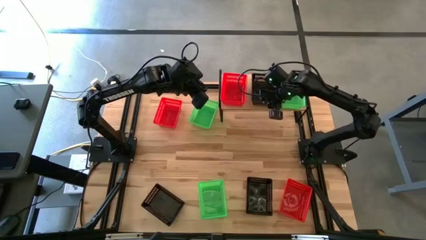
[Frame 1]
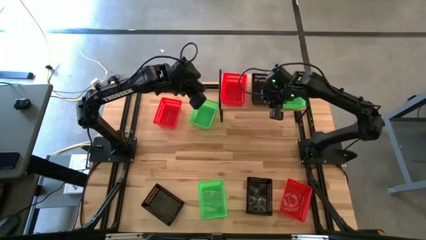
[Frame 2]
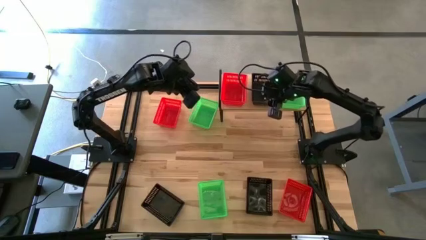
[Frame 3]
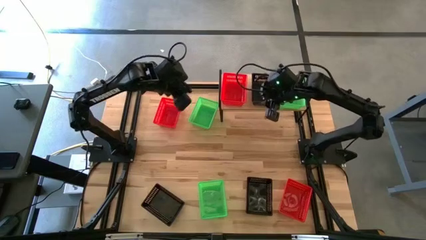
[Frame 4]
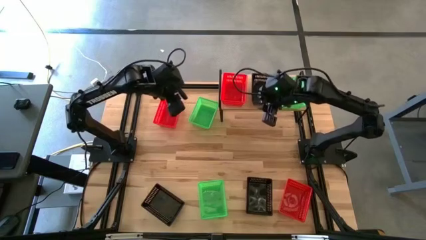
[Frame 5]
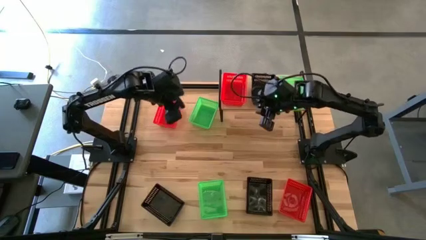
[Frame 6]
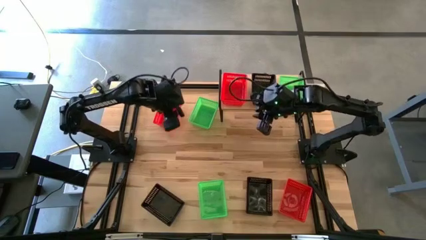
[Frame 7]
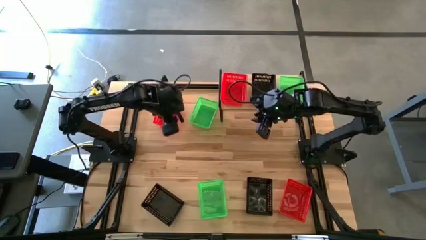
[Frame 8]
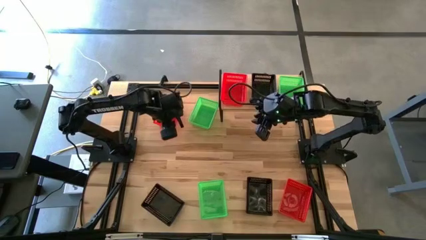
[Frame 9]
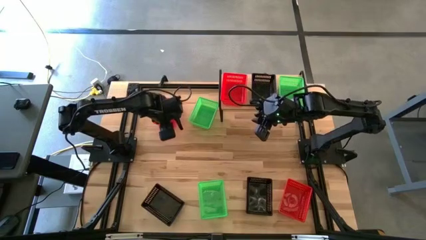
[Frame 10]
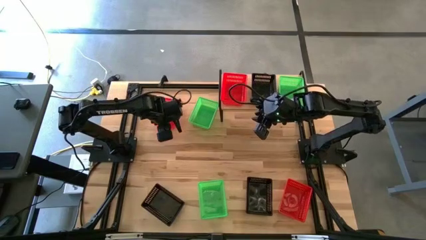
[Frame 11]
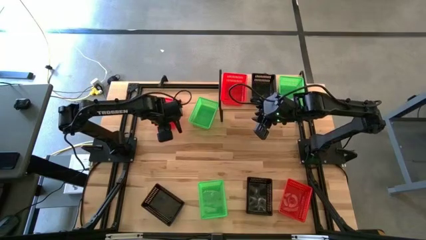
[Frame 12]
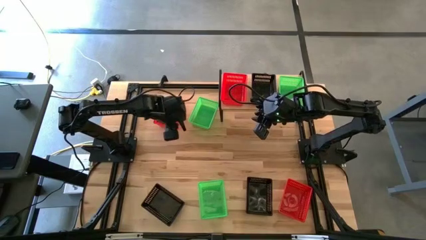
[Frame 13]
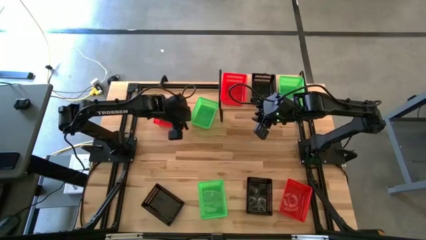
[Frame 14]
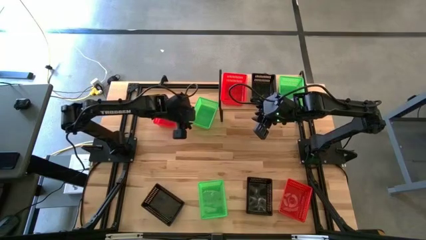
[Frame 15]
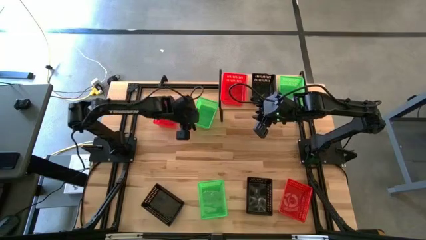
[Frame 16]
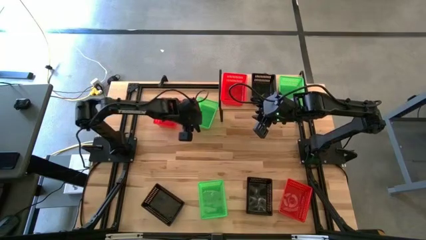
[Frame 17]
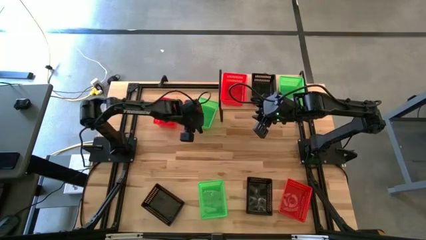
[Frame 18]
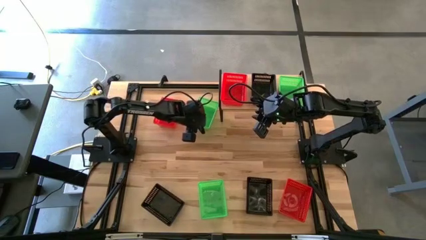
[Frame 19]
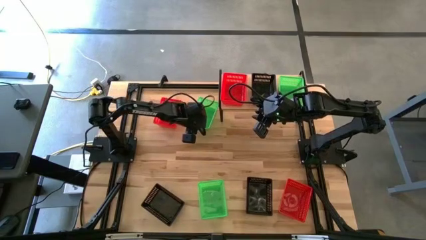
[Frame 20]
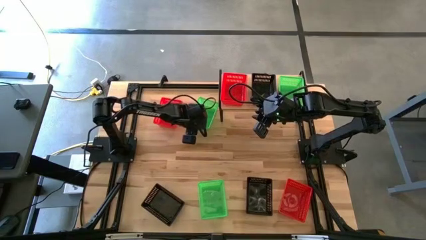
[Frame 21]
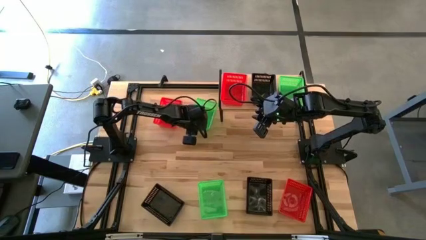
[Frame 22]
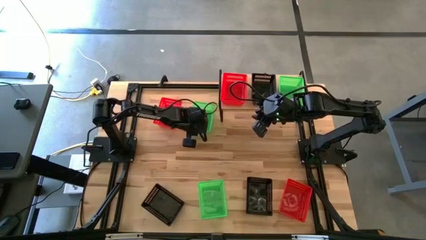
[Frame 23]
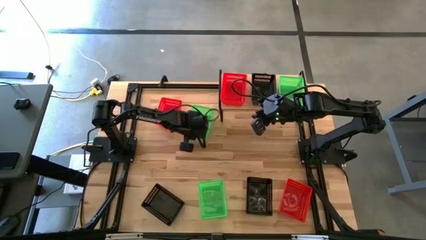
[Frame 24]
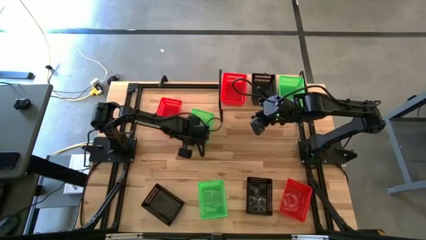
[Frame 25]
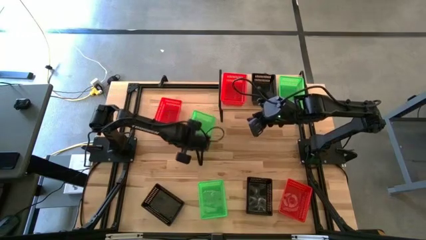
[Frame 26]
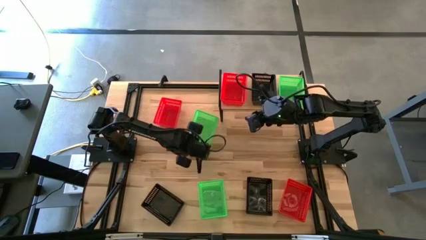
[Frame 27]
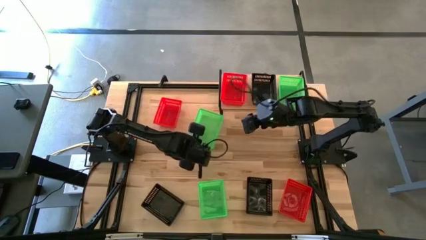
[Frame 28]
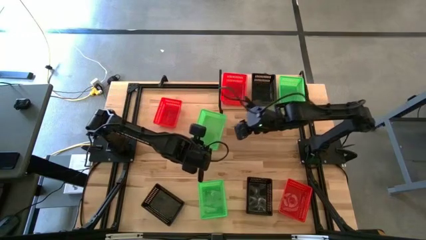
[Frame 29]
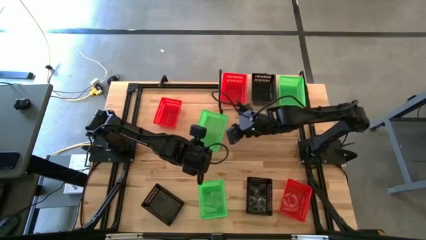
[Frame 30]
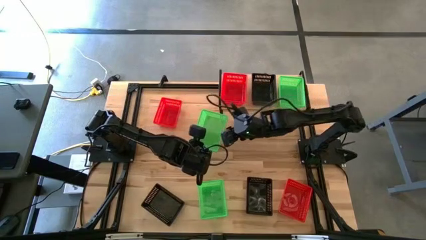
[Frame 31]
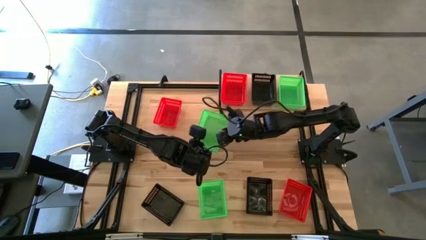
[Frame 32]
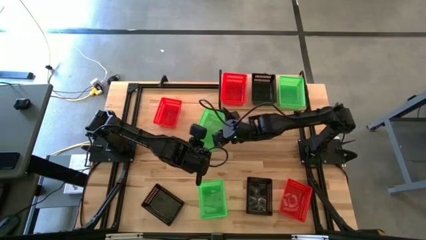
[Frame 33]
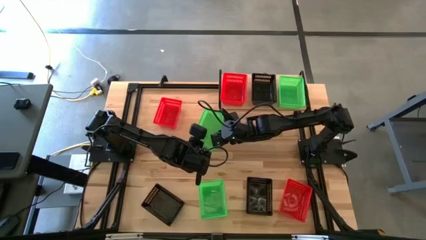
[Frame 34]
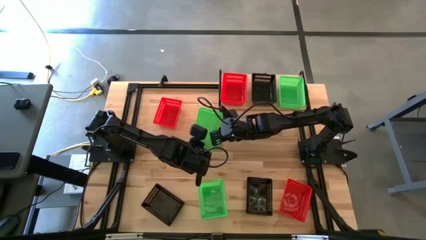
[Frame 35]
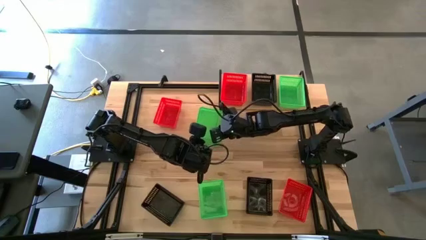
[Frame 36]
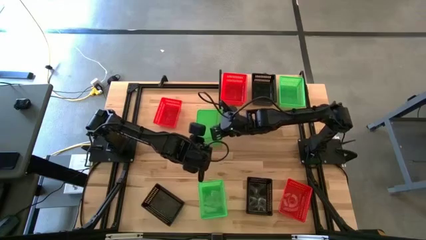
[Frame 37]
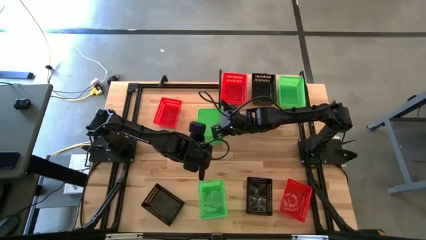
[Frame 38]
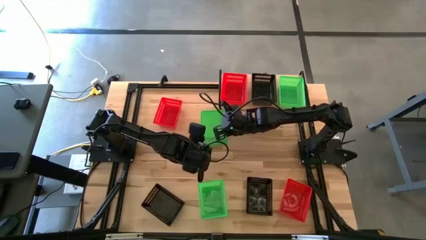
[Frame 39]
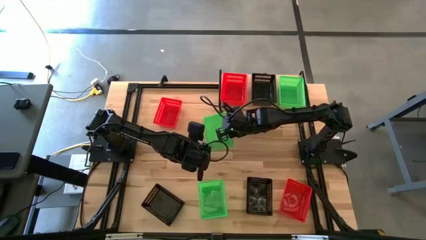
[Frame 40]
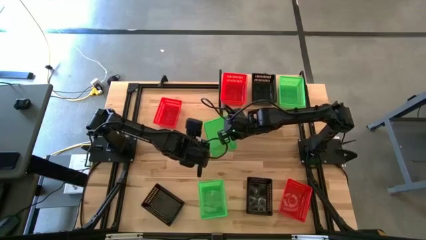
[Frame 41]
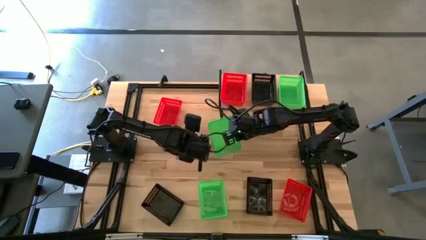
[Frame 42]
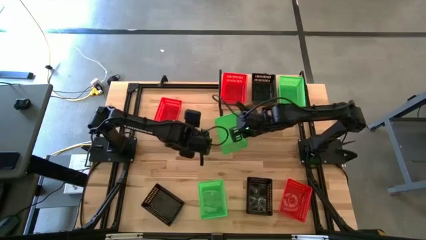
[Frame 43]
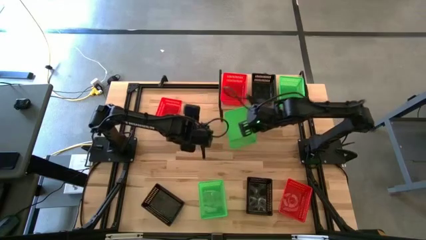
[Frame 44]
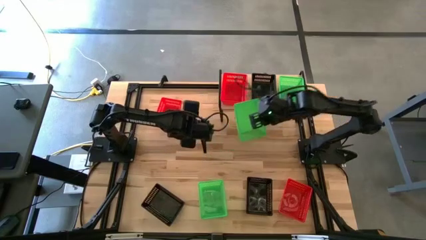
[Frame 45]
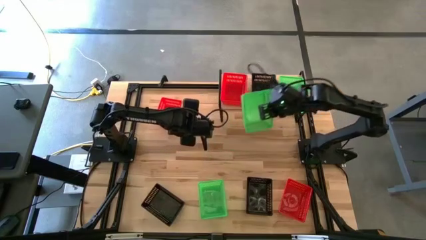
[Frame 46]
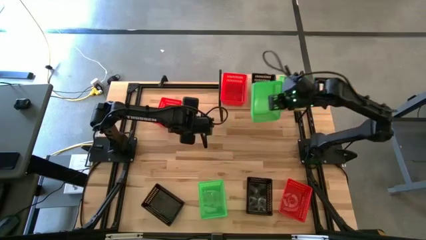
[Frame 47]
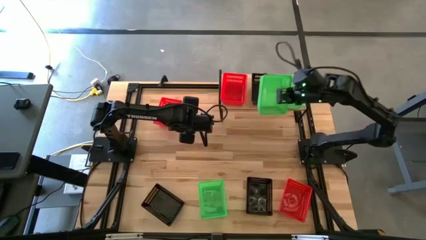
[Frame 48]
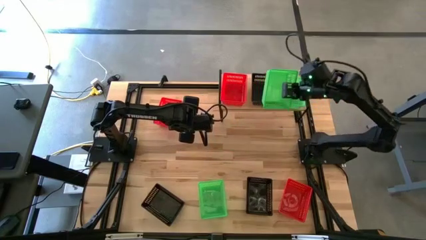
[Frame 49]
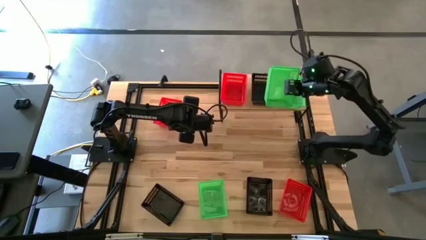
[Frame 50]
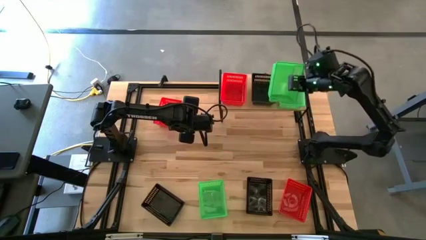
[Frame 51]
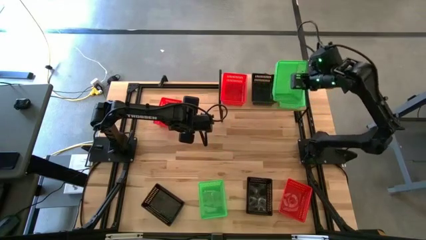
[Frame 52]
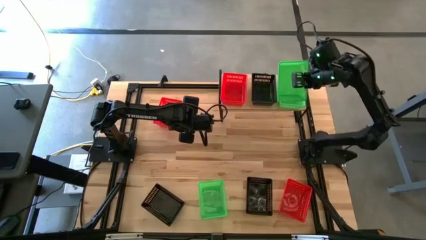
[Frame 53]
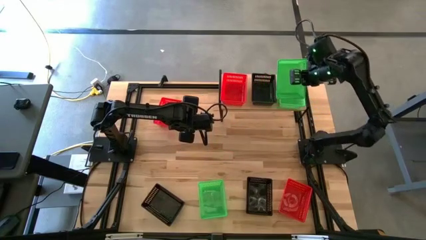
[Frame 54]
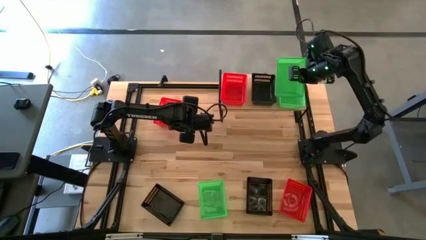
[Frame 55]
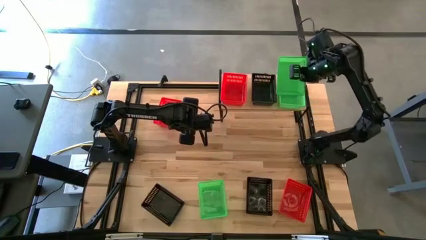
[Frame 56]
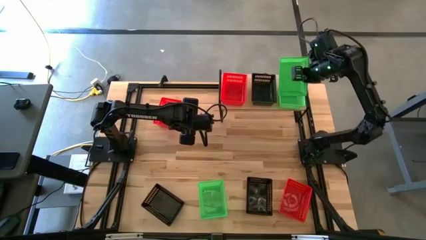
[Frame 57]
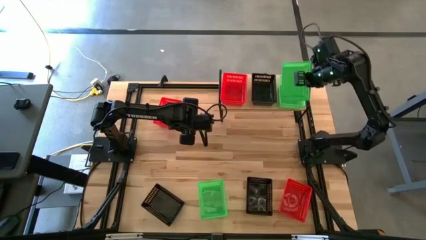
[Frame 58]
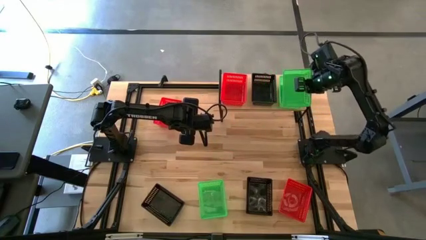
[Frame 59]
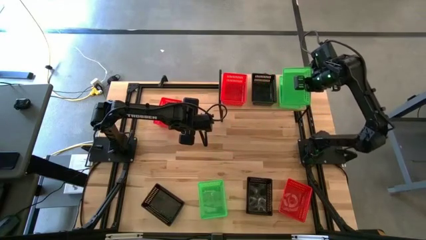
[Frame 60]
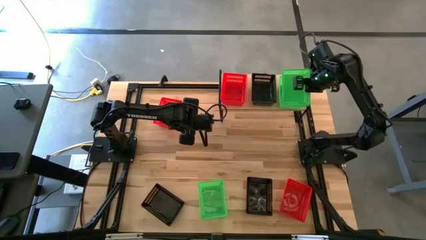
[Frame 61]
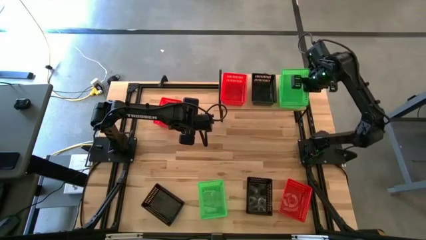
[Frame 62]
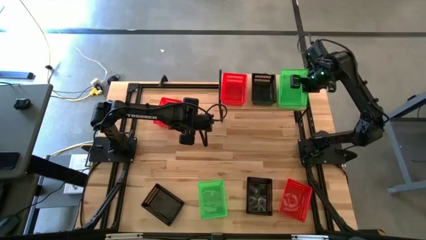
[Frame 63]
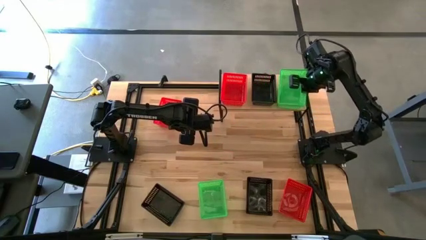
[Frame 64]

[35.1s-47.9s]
Task: Stack baskets on shelf by color
Stack the top green basket on top of the other green basket on the shelf

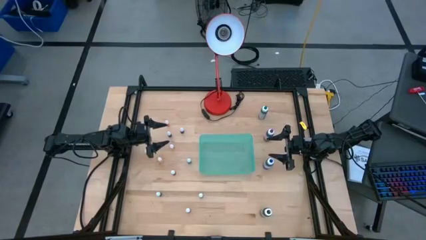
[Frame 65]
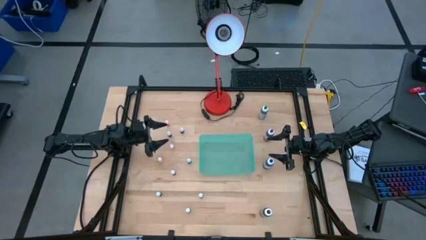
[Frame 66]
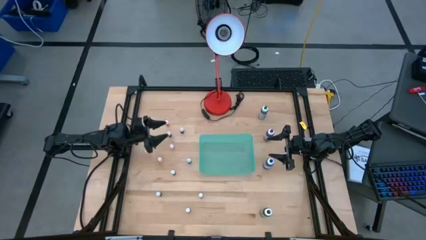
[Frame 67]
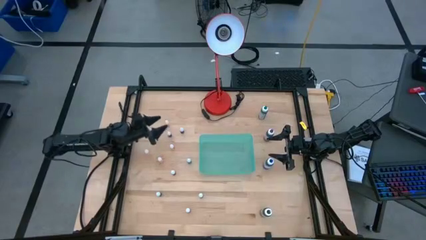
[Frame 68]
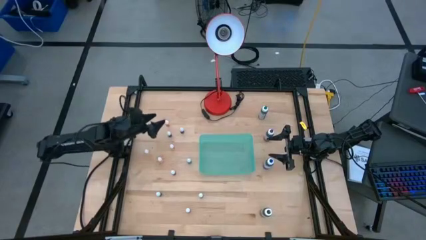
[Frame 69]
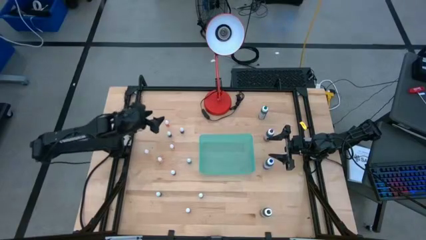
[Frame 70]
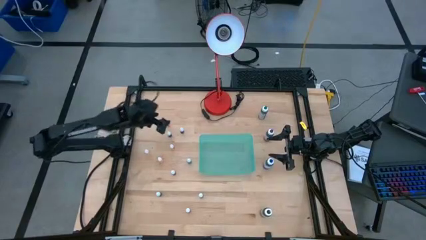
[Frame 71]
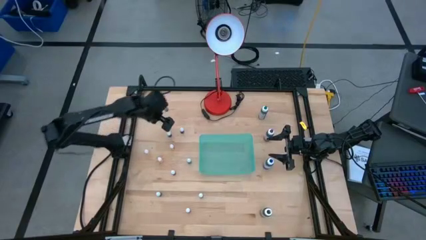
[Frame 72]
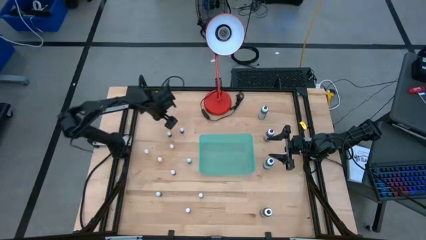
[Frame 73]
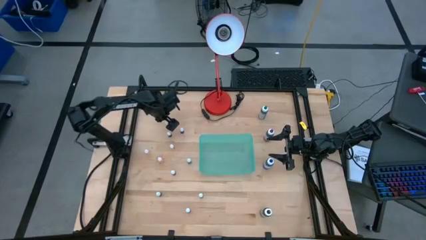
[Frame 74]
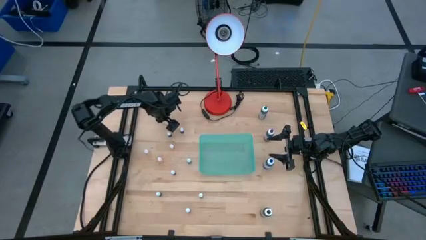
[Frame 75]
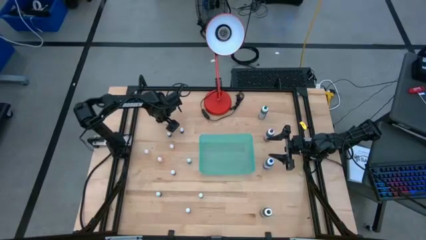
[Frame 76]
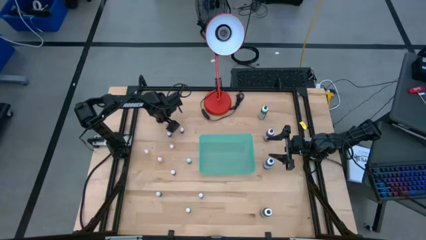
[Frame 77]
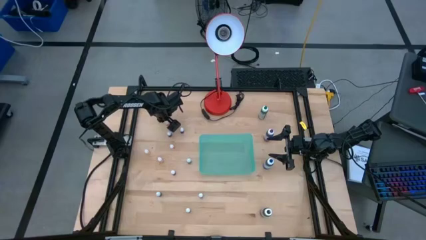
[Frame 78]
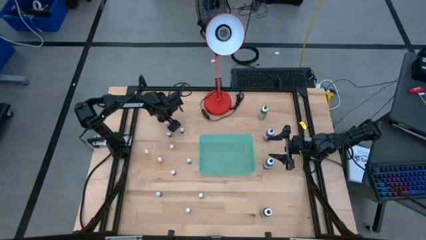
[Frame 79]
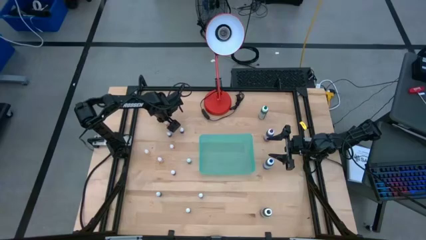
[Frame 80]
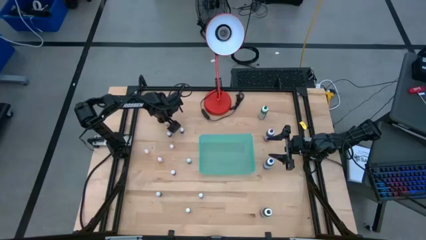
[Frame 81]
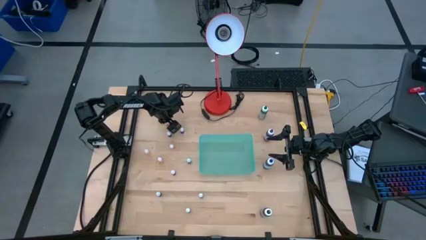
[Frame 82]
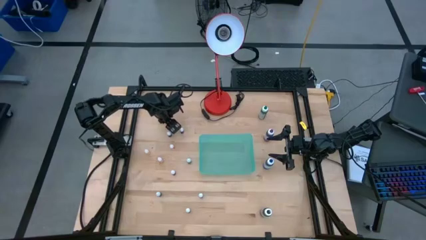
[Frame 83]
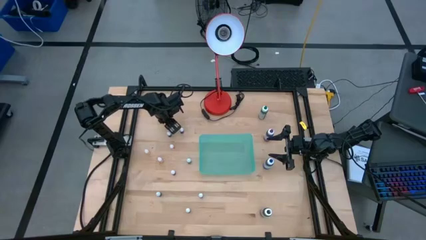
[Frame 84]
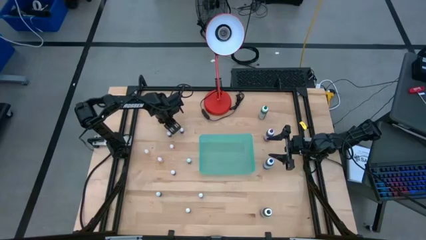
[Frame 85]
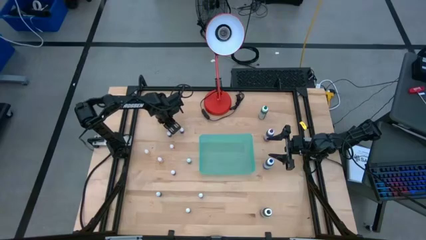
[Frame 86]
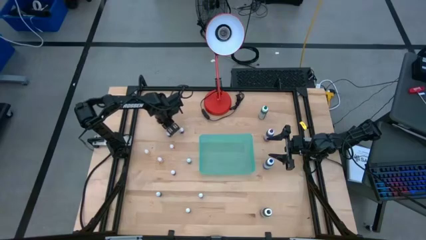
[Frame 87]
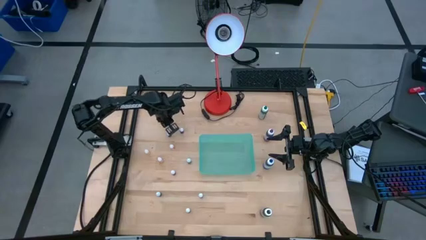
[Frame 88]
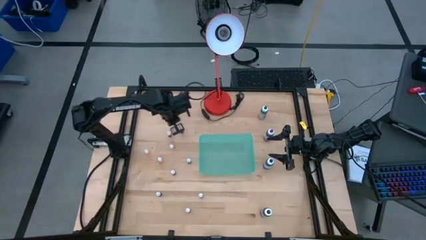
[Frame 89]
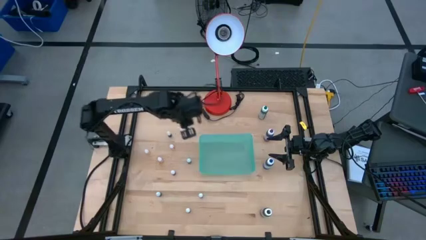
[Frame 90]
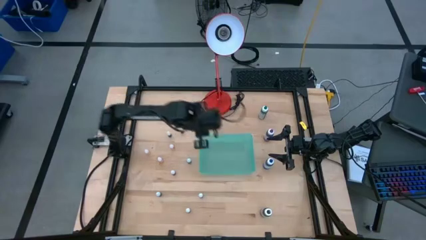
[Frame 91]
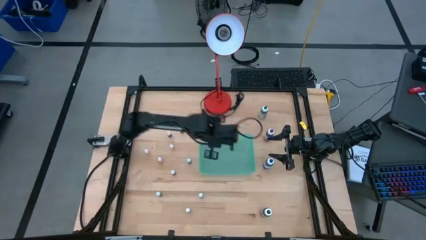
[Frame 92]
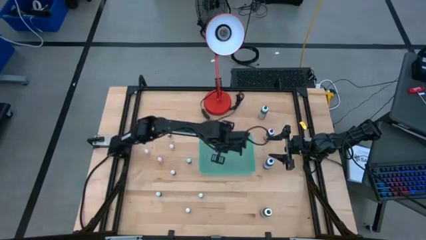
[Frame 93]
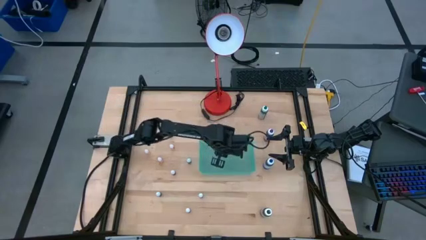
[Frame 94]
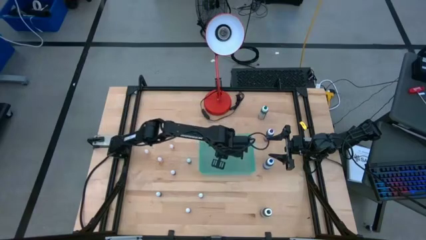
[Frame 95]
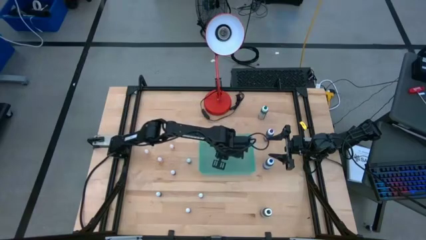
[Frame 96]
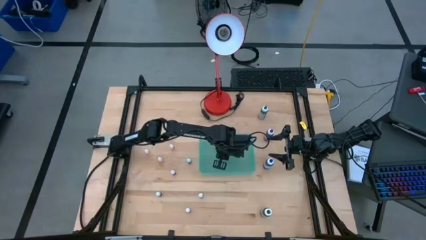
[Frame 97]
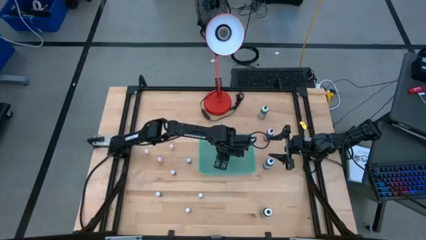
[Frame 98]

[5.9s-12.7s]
Task: Pick & Place food coloring
Put the small orange food coloring bottle into the green bin
